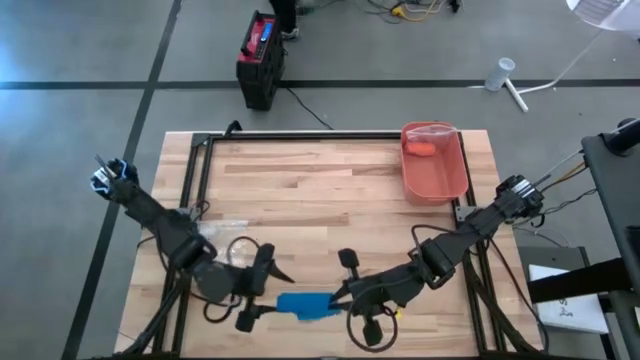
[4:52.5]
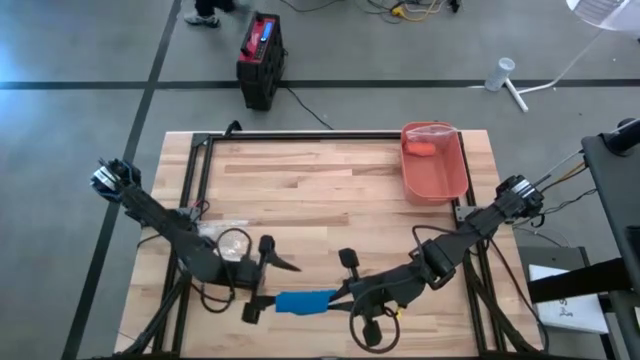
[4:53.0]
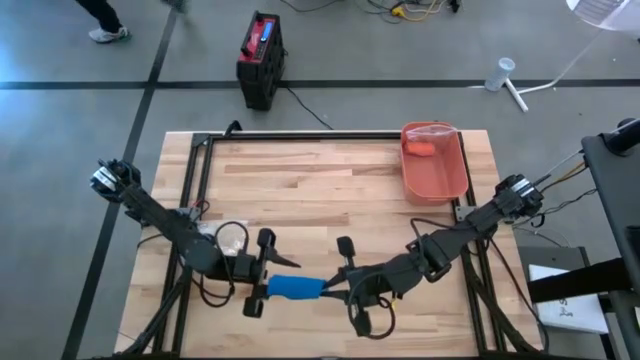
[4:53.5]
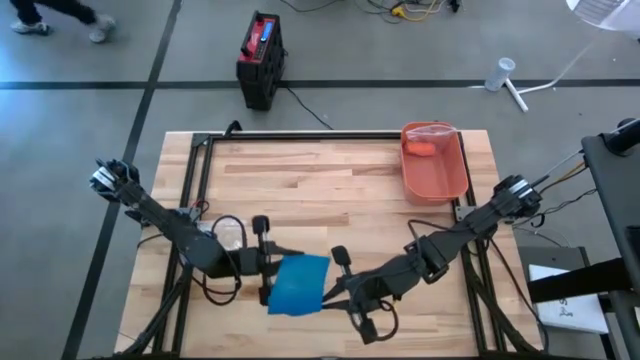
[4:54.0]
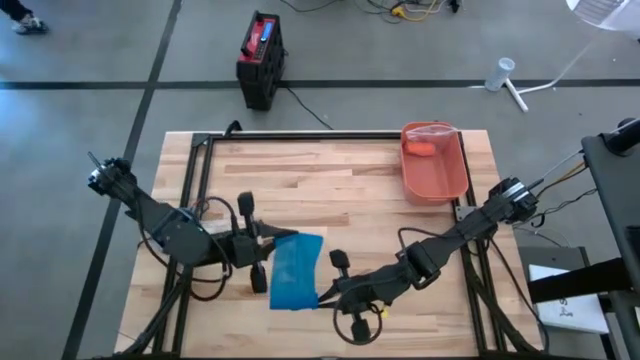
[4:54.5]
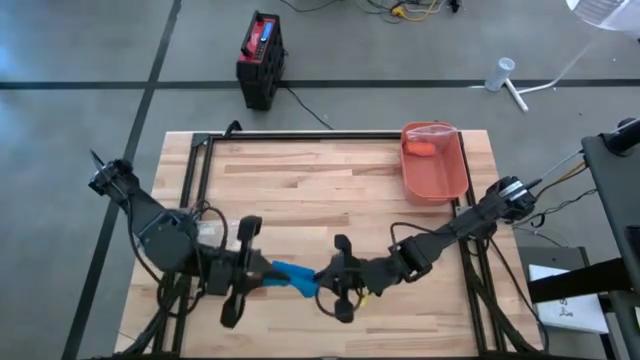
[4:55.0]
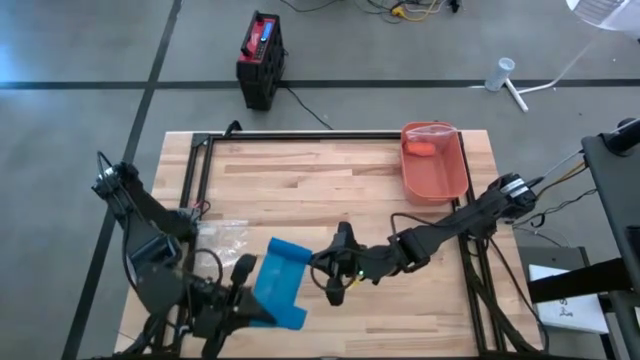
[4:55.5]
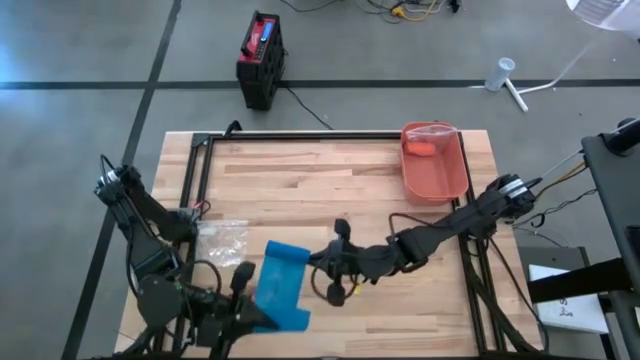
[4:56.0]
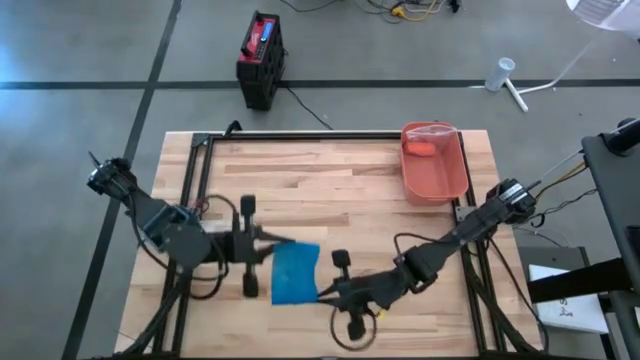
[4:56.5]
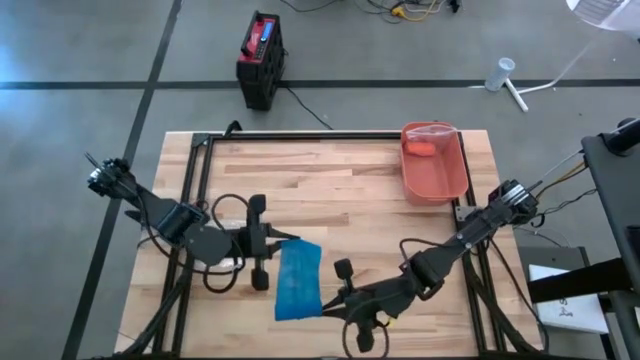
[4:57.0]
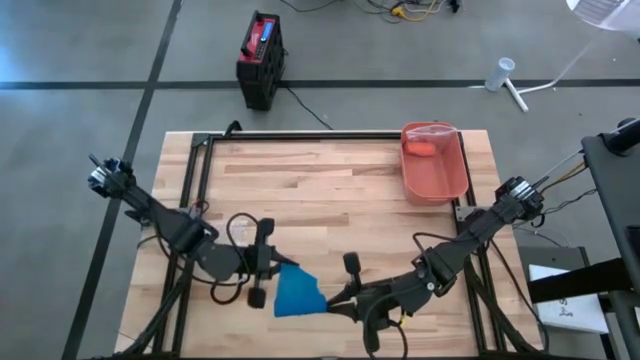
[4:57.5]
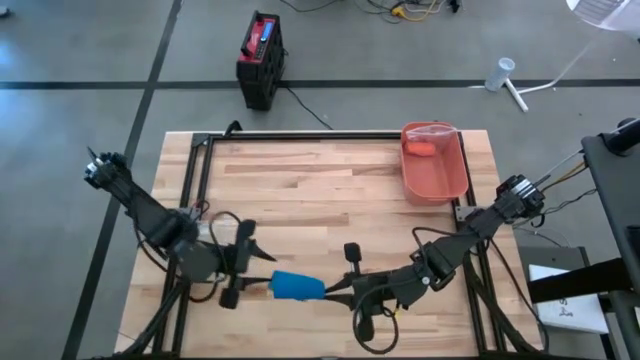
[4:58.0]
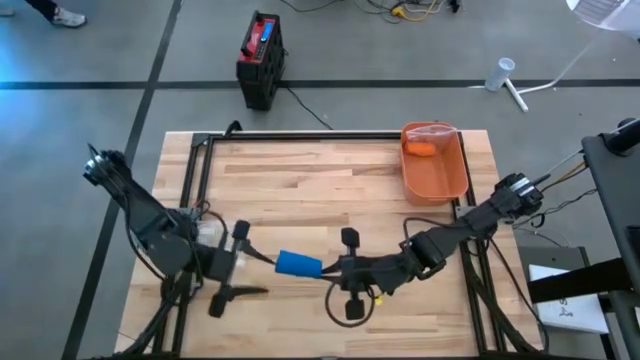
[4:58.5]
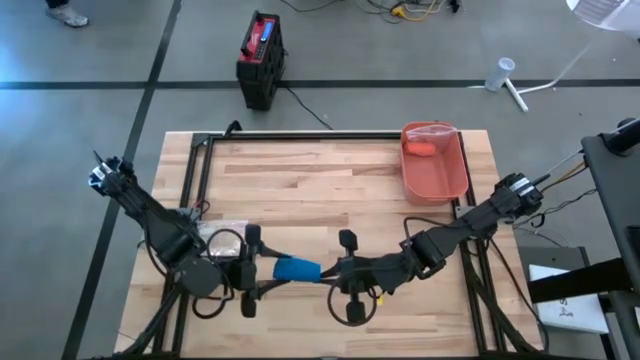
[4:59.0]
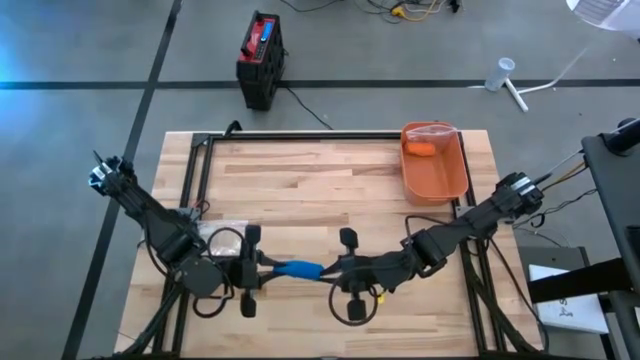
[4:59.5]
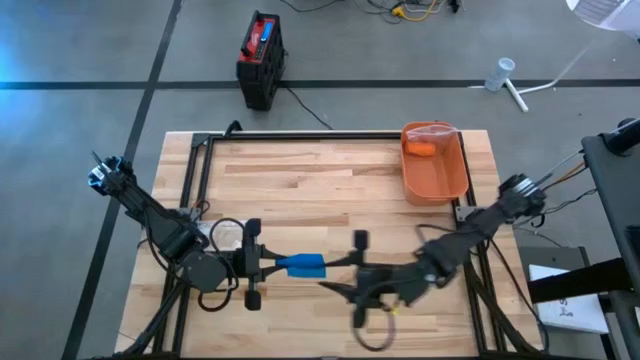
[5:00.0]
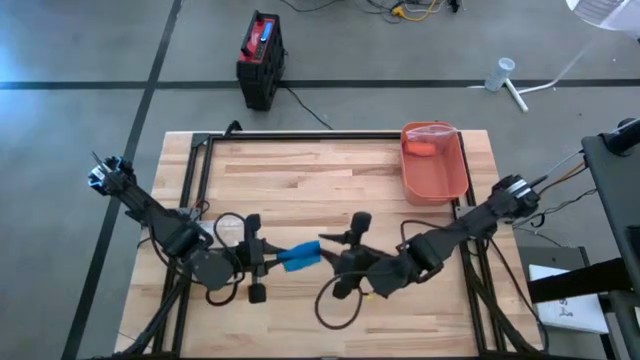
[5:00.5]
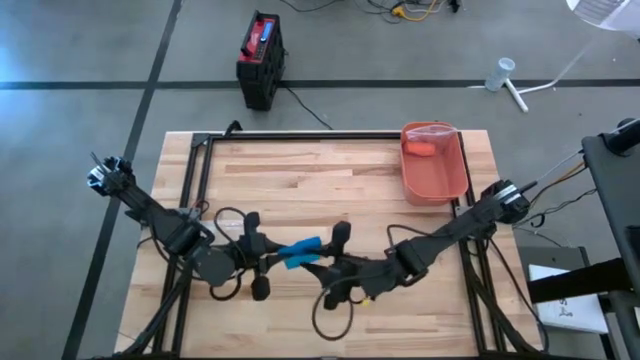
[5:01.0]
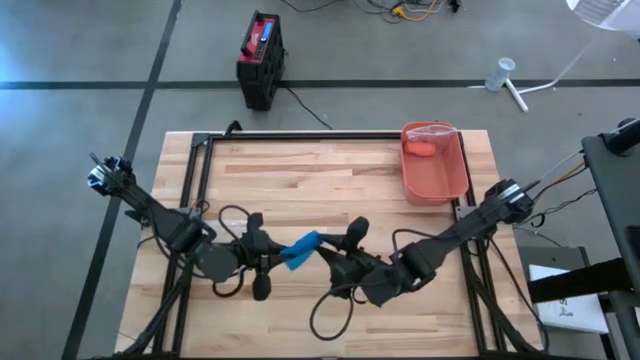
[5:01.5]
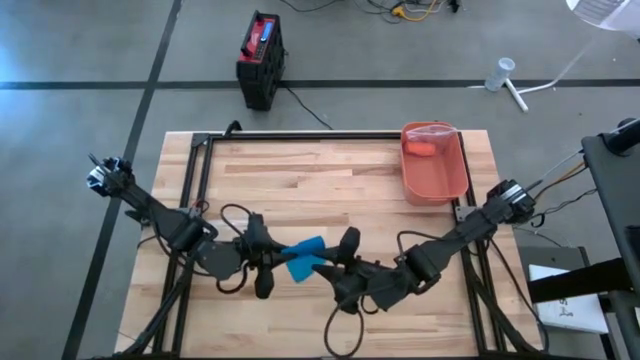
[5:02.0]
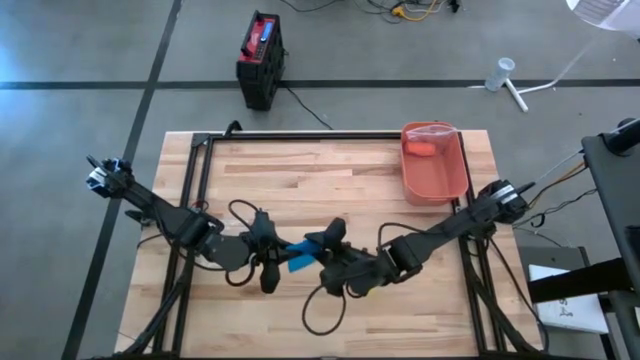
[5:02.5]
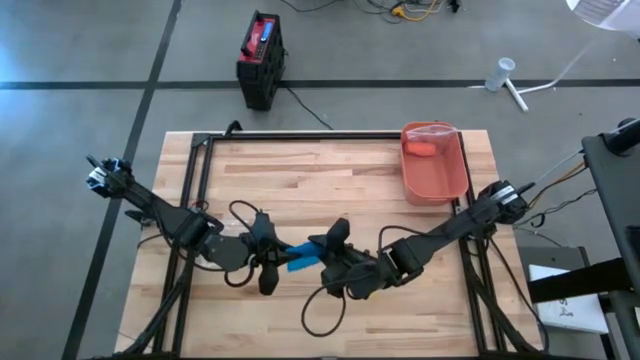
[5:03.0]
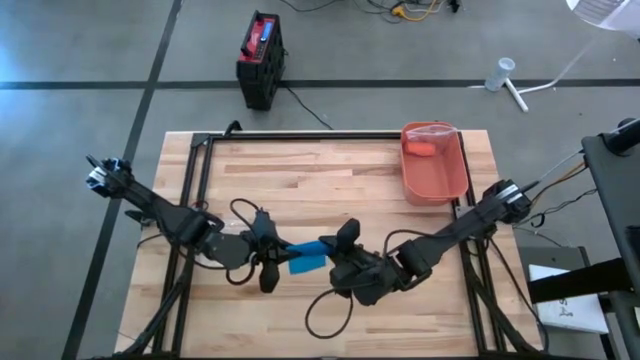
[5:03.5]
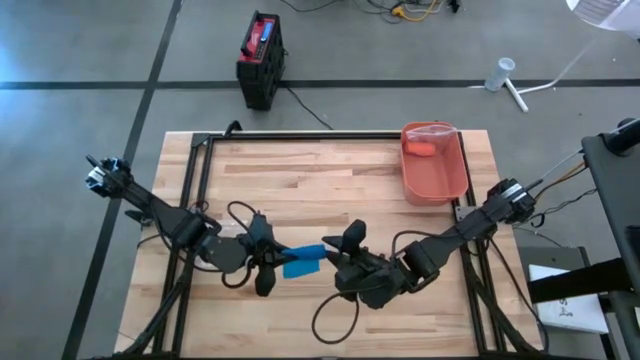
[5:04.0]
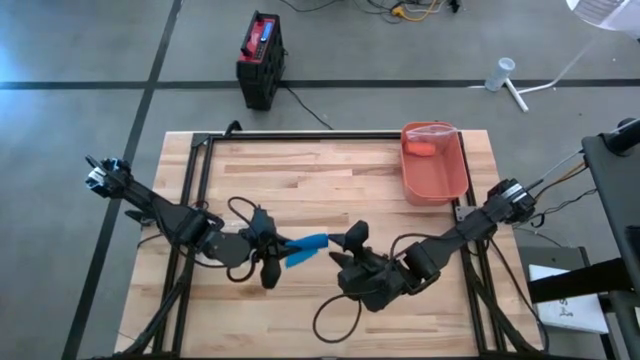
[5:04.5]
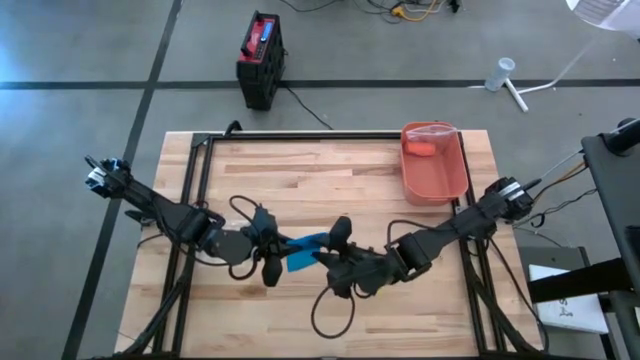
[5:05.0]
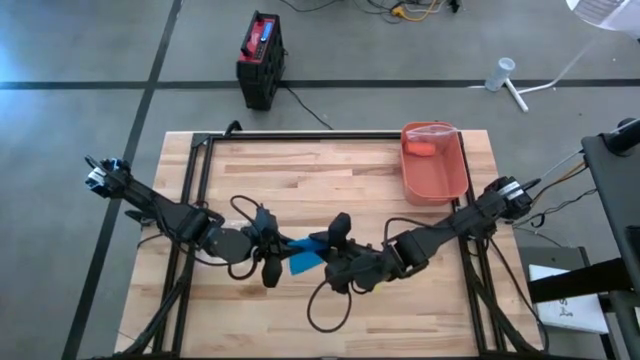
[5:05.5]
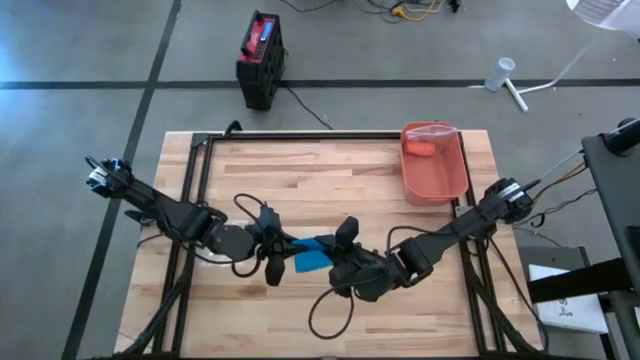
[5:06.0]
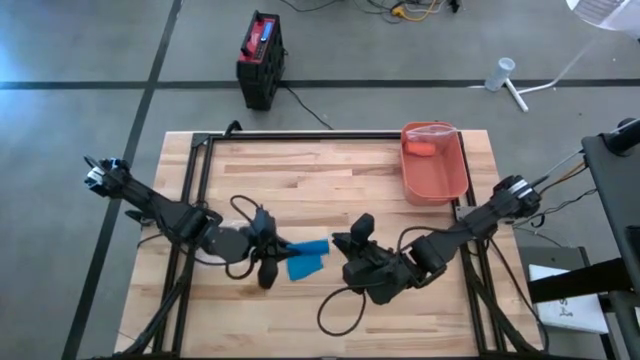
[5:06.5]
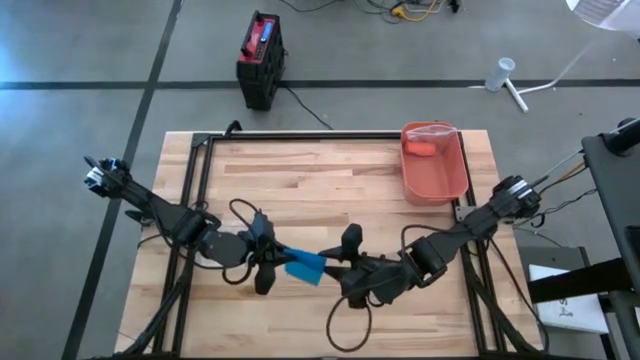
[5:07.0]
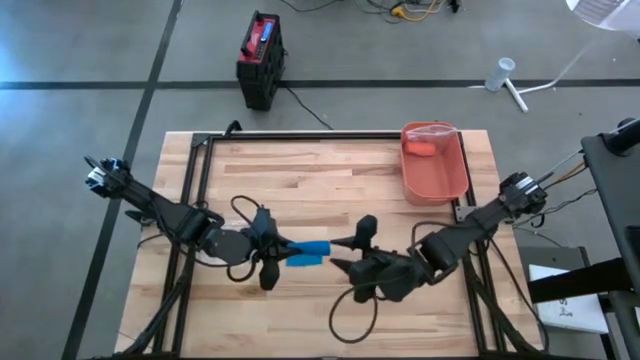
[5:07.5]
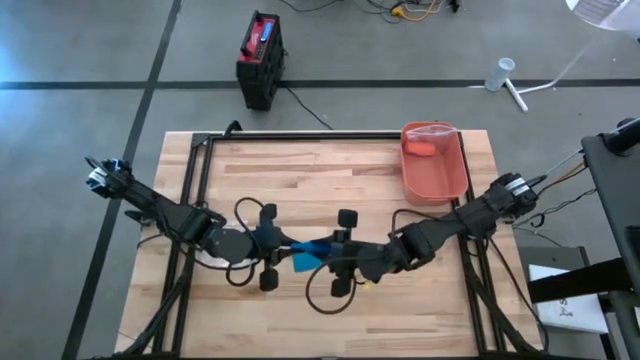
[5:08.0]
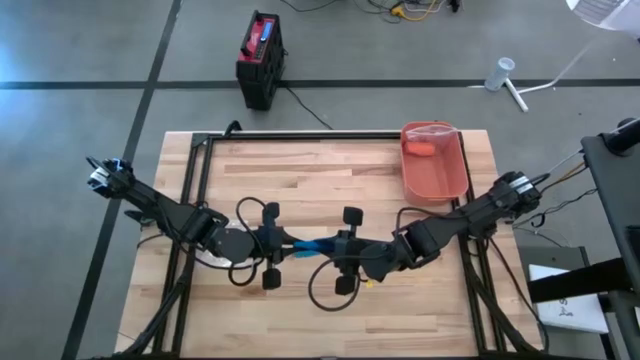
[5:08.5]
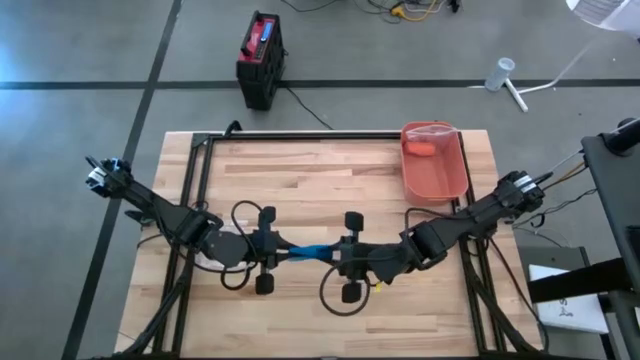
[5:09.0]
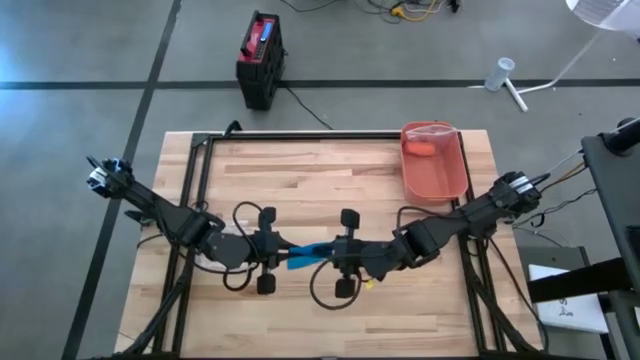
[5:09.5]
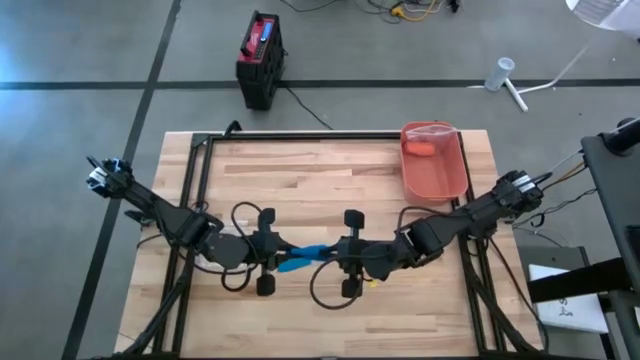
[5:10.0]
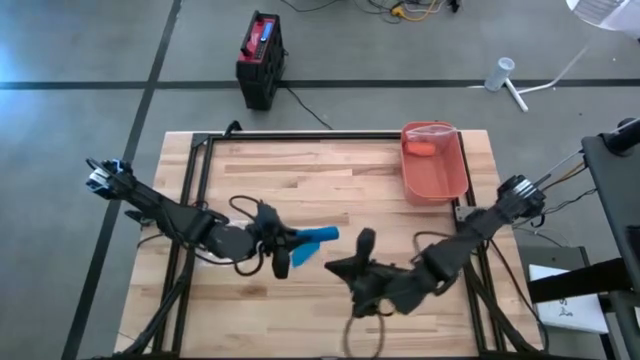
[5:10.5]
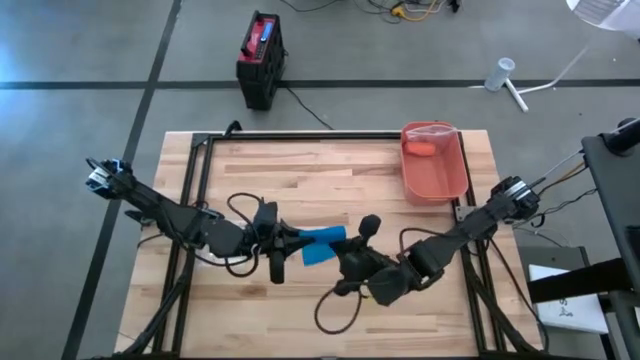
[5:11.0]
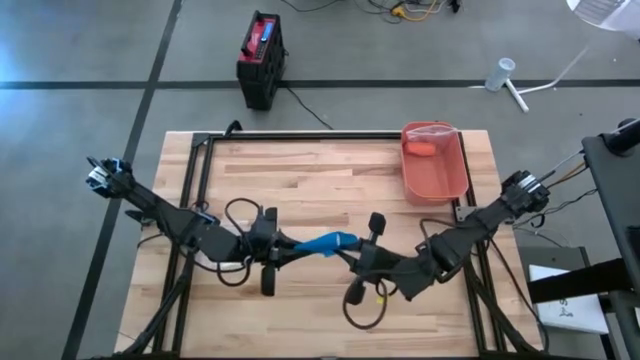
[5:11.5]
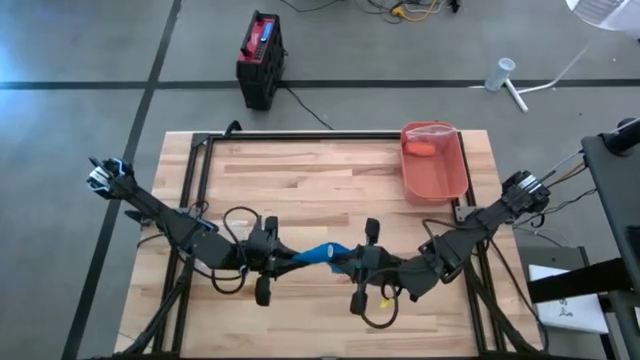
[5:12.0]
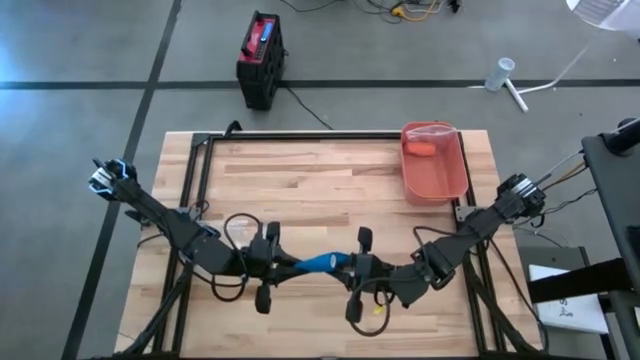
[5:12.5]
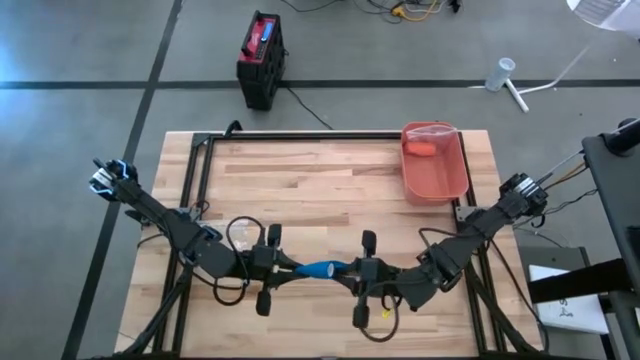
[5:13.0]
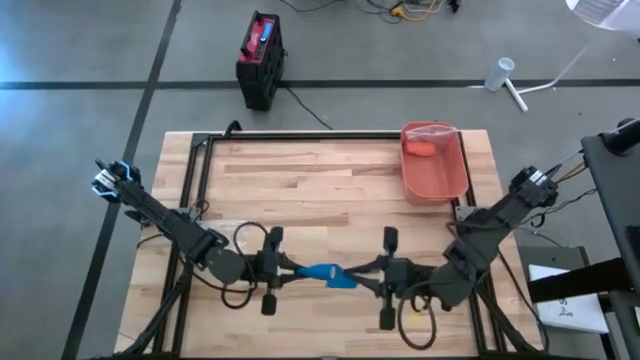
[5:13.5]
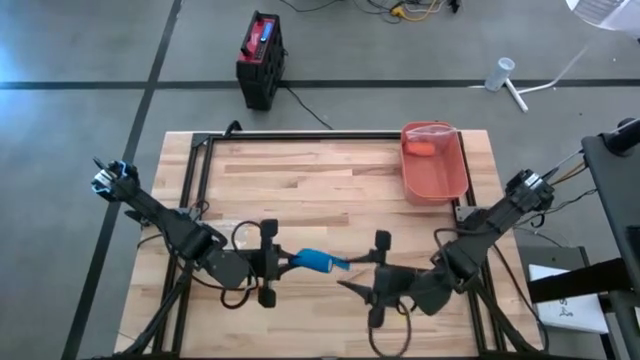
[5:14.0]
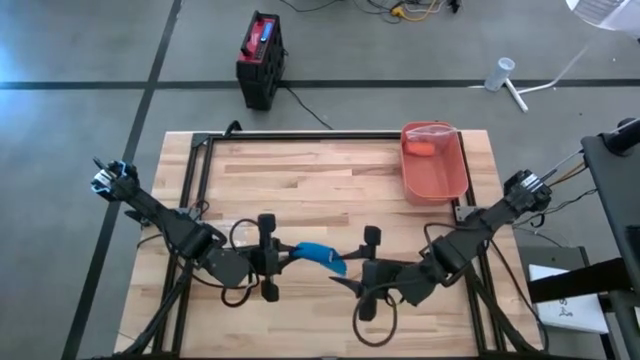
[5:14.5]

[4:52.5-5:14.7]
Task: Roll bandage
Roll the blue bandage
